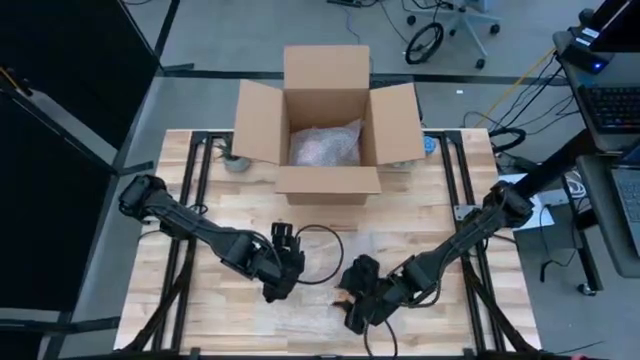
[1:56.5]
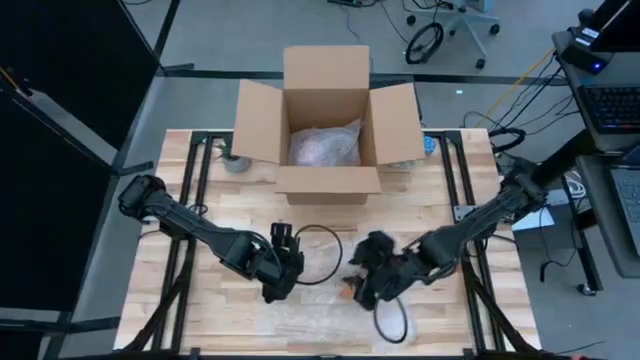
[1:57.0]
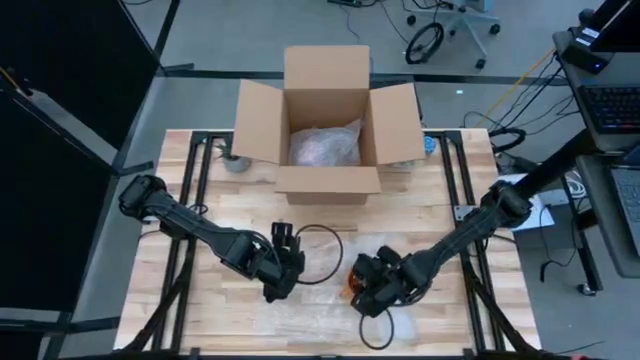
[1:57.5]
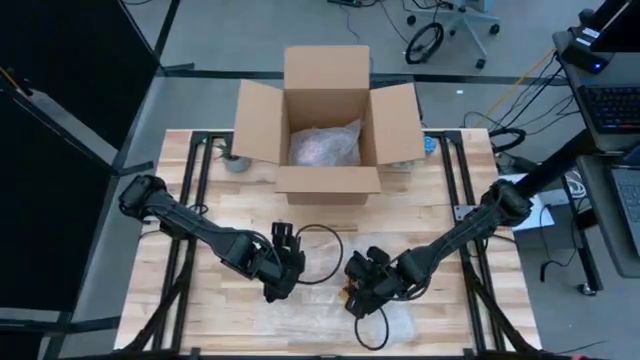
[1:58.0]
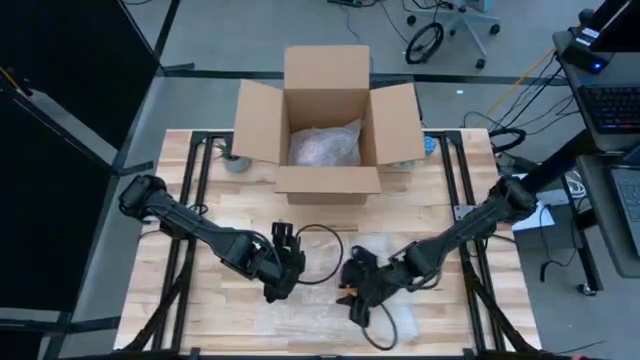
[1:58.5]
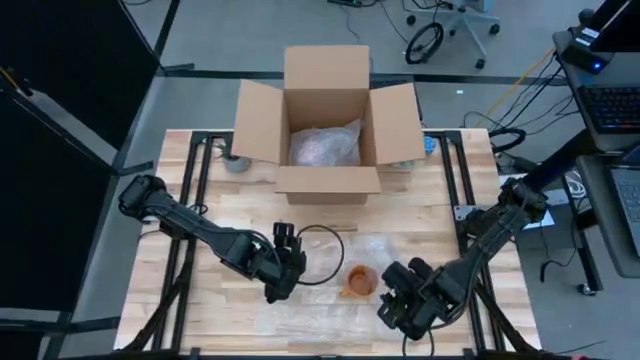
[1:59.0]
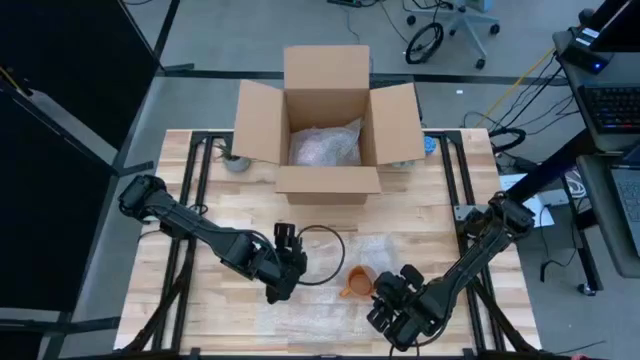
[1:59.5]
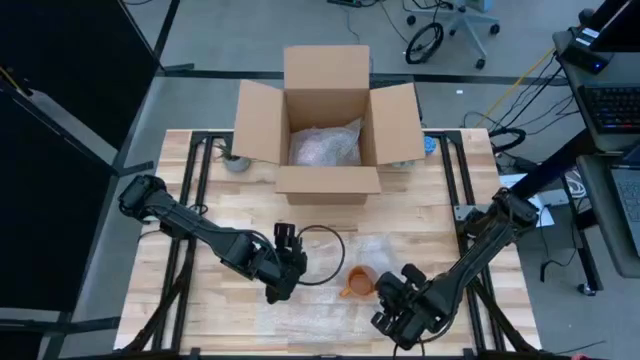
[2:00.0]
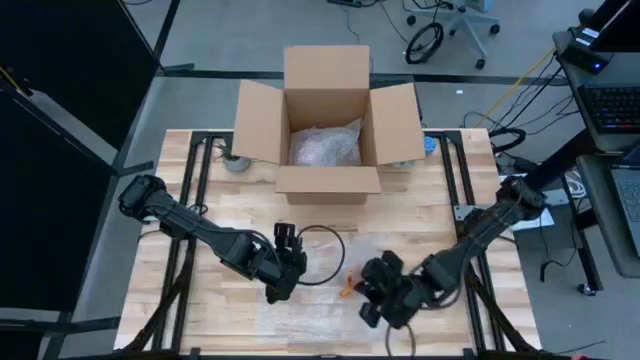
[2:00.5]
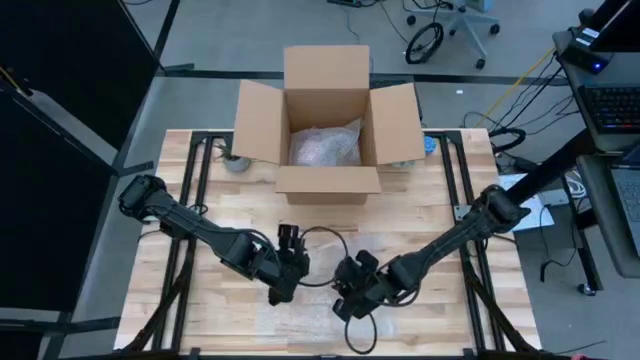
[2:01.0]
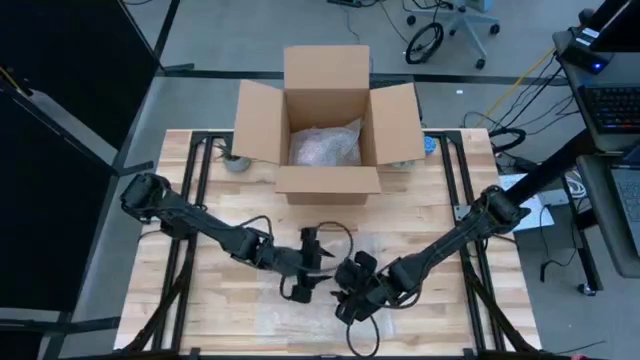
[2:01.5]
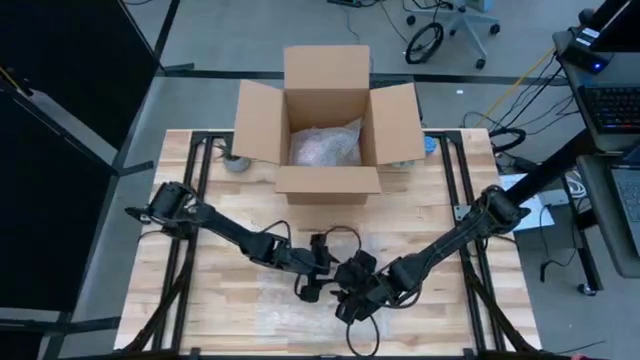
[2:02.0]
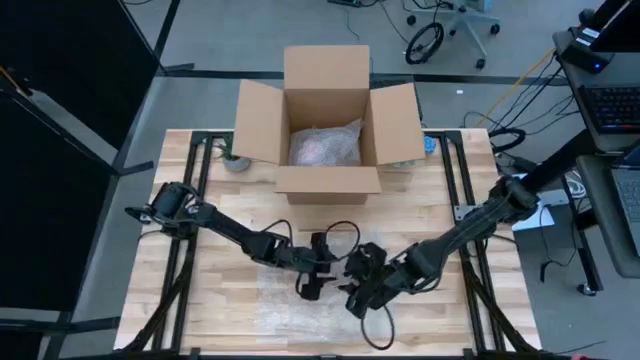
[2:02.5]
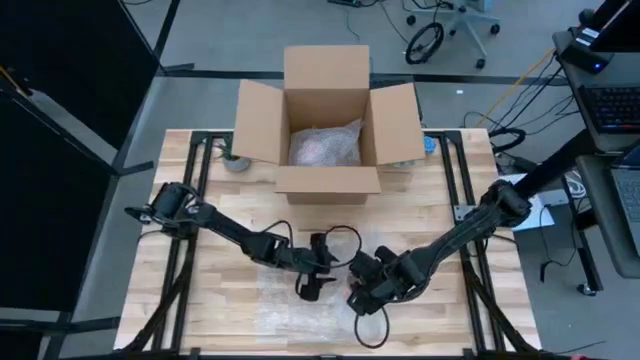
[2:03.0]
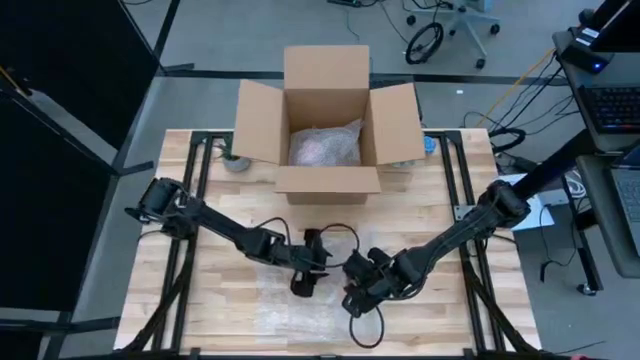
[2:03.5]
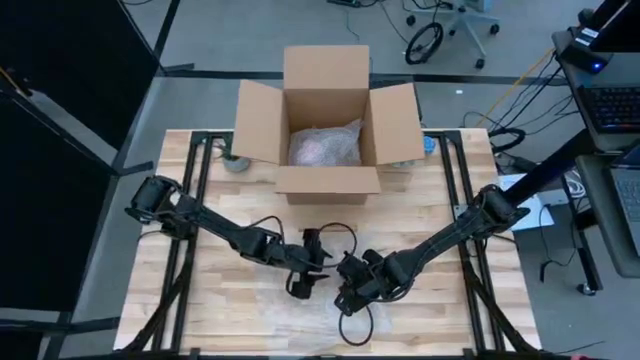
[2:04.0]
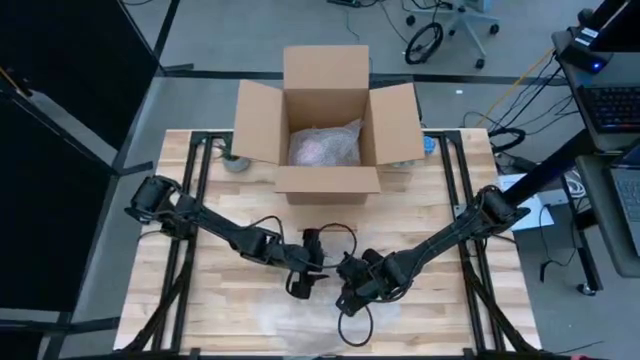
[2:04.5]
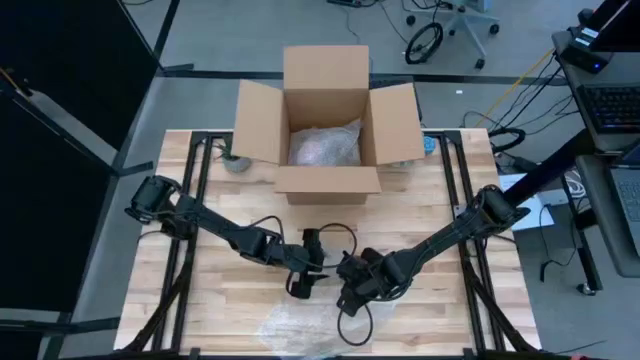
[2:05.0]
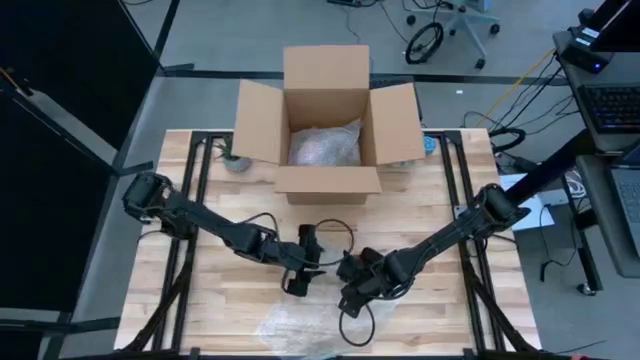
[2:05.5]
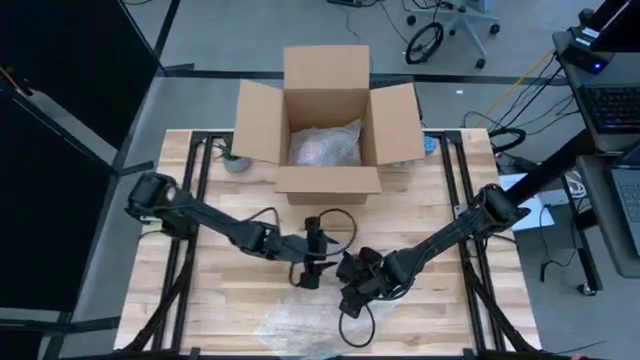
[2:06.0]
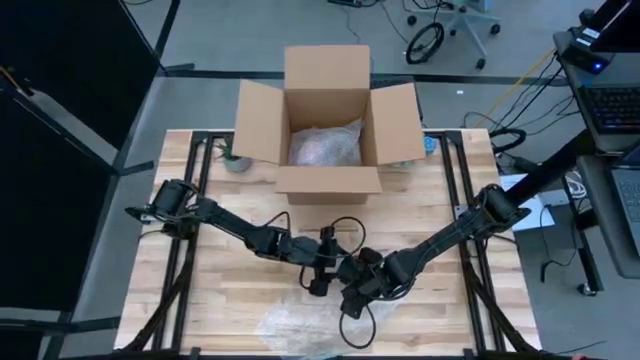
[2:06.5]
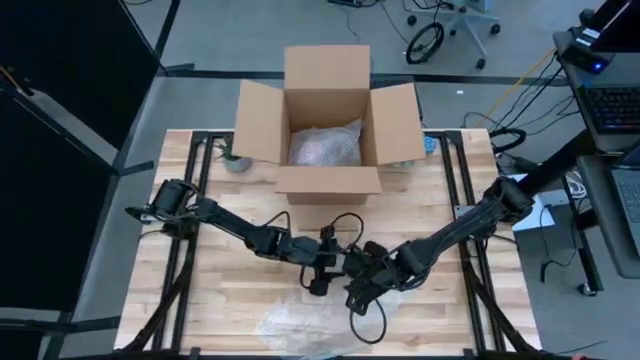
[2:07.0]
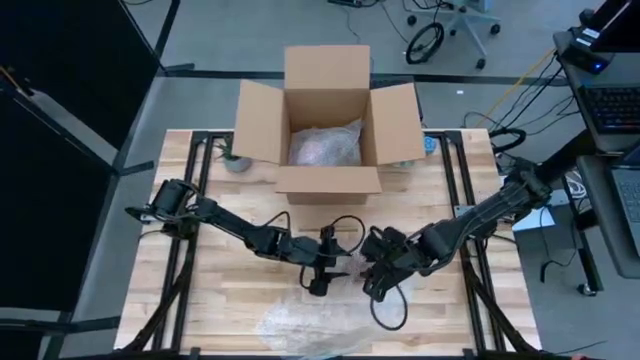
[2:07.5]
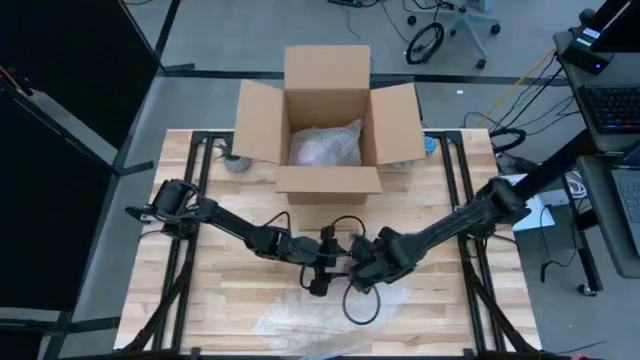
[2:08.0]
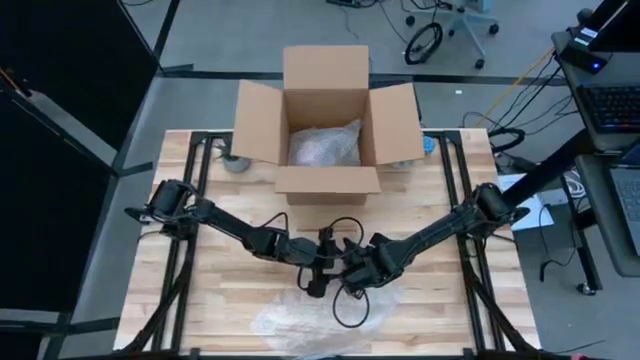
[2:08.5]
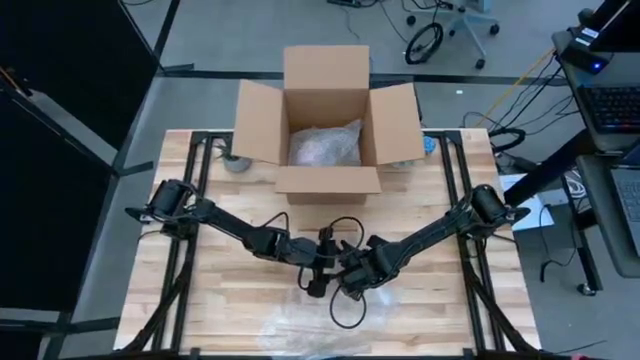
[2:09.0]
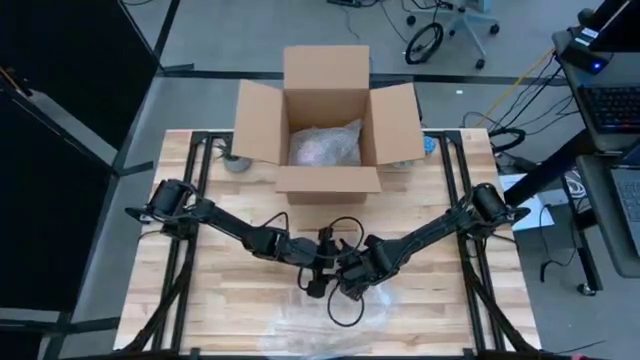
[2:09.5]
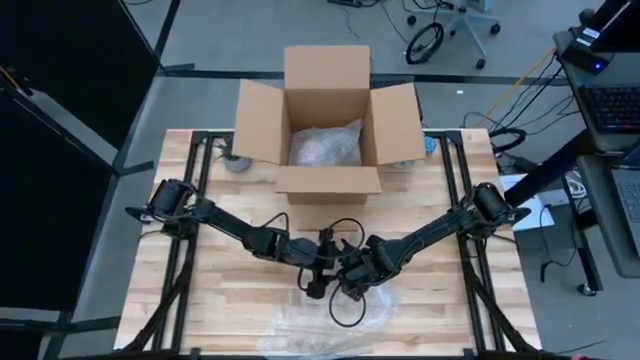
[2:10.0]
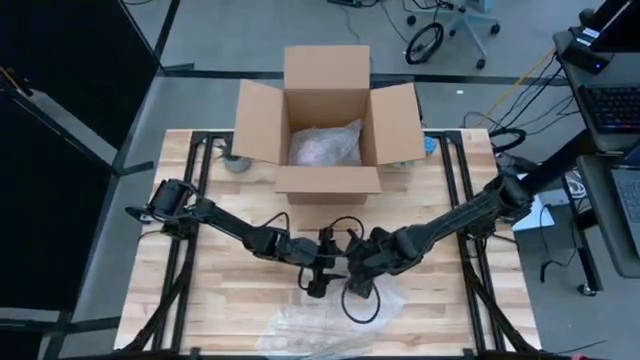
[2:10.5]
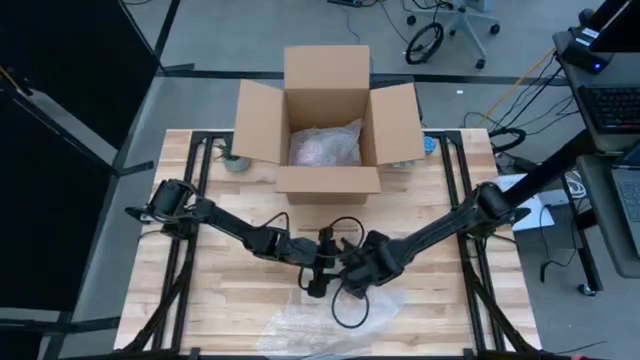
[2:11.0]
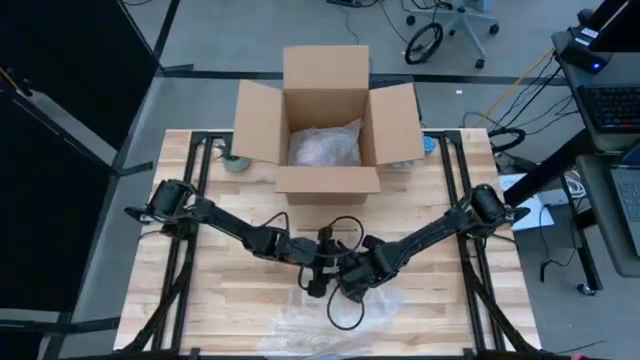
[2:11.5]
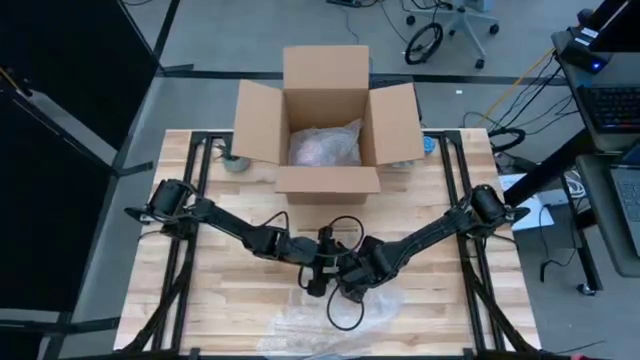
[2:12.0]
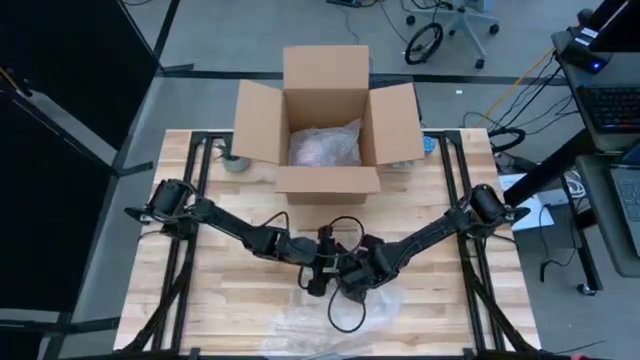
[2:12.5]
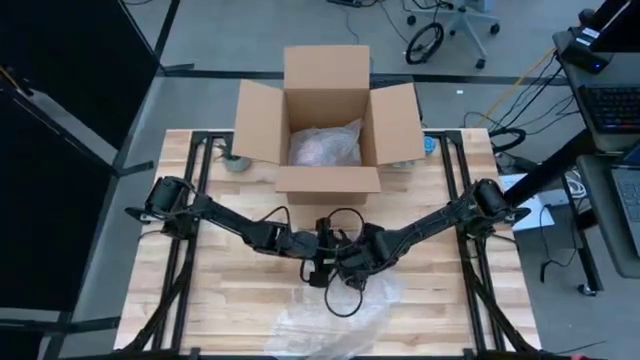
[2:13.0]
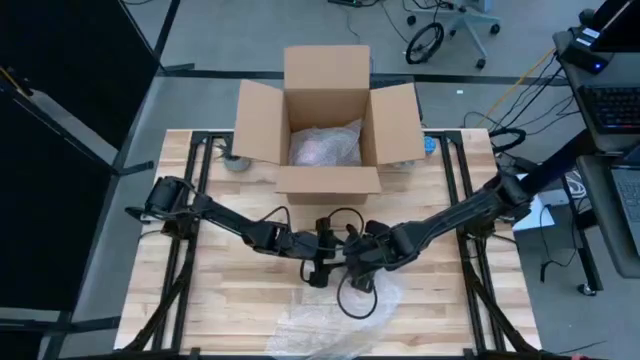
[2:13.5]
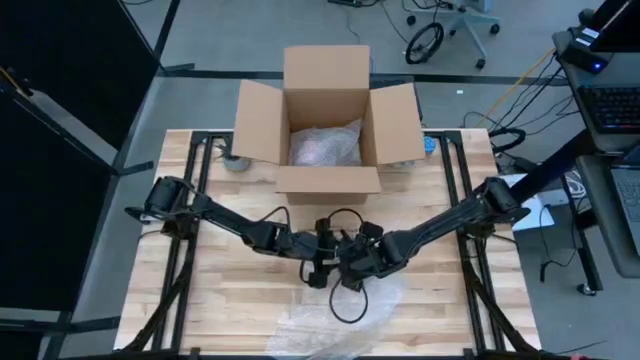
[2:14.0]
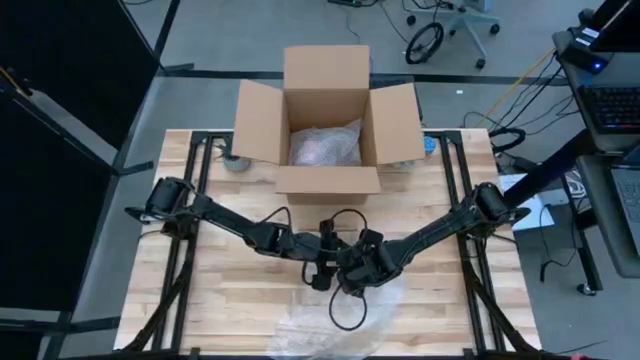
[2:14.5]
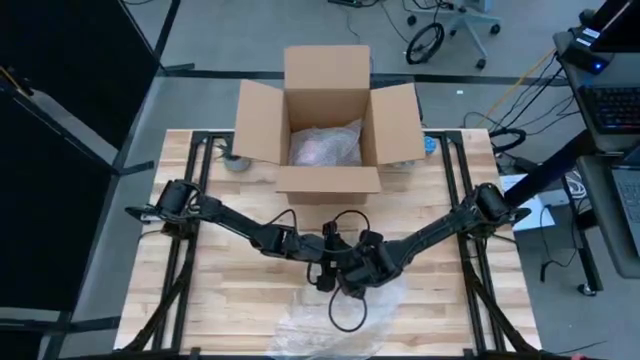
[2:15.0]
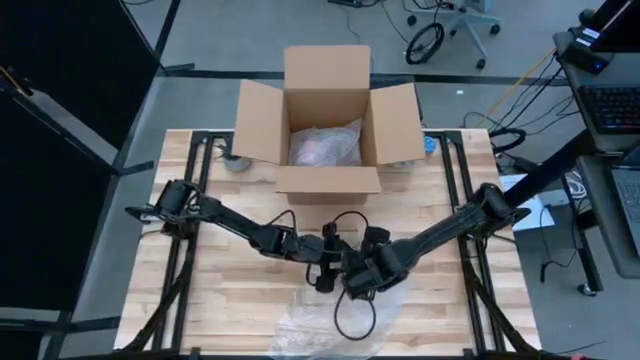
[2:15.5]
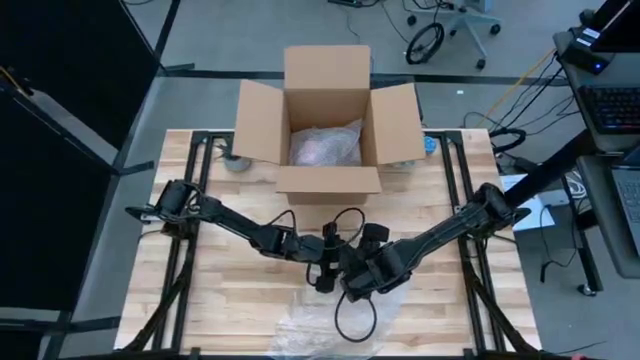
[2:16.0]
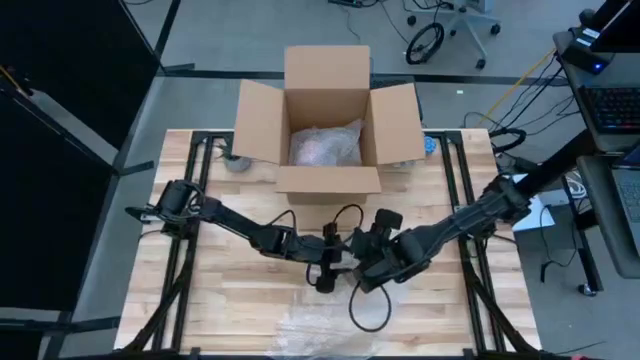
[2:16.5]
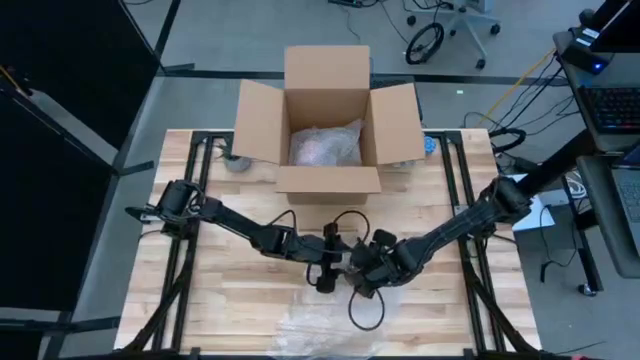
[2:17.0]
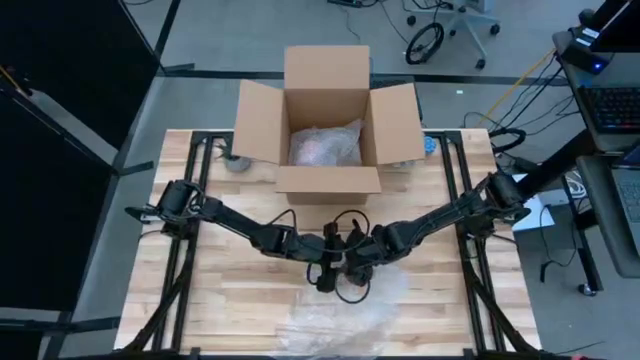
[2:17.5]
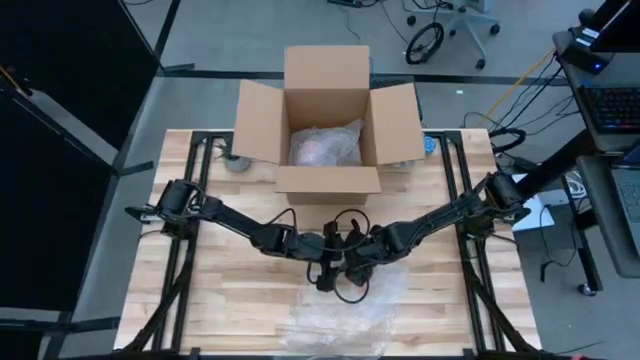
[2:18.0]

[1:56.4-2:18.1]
Task: wrap mug
Wrap the orange mug with transparent bubble wrap
